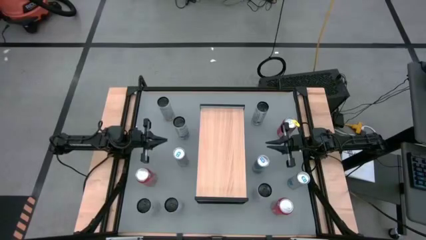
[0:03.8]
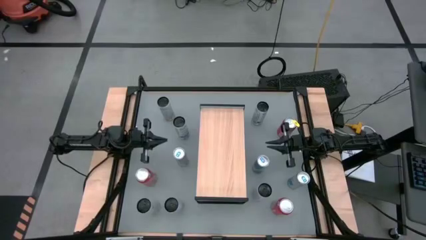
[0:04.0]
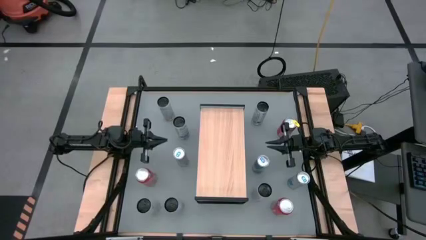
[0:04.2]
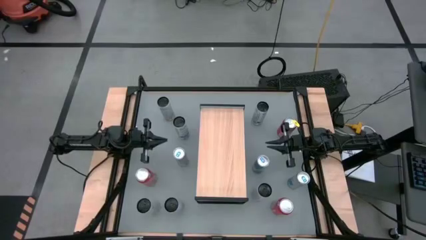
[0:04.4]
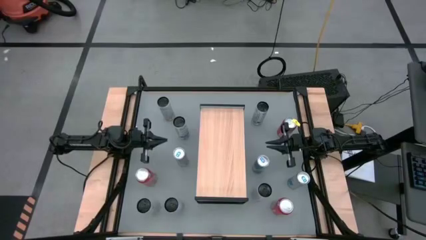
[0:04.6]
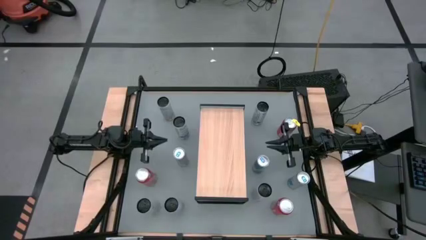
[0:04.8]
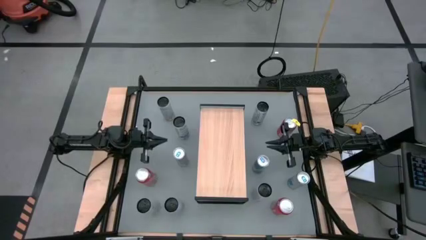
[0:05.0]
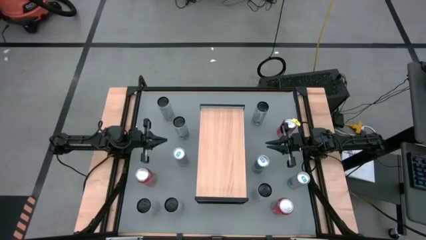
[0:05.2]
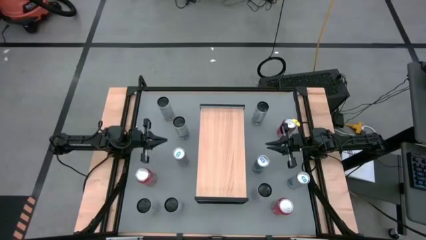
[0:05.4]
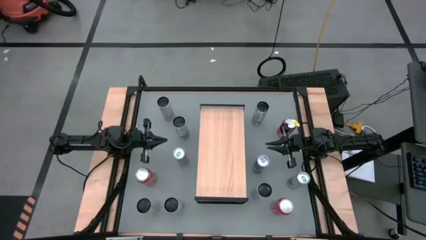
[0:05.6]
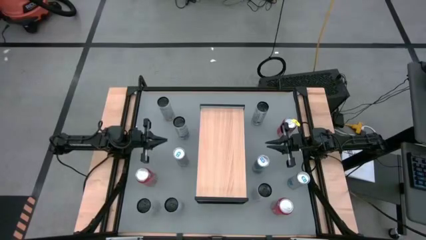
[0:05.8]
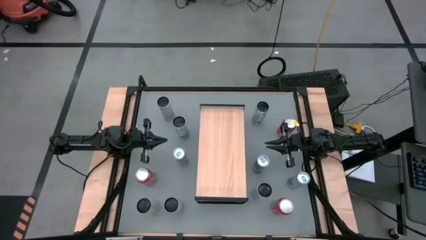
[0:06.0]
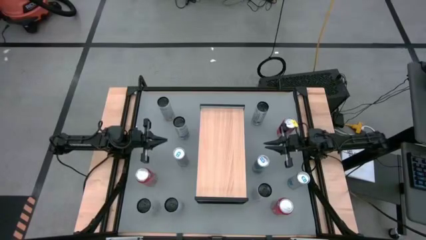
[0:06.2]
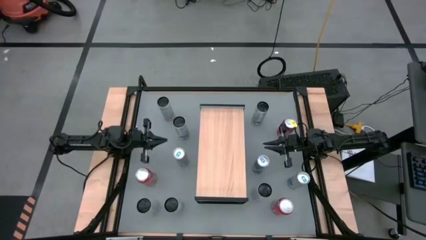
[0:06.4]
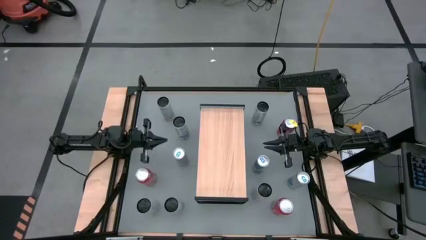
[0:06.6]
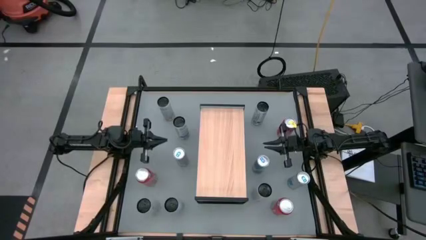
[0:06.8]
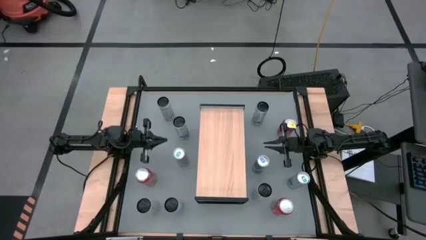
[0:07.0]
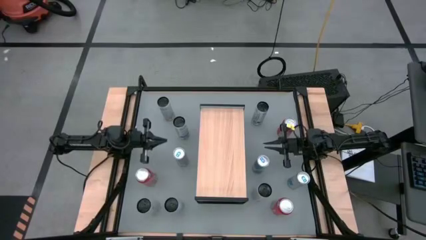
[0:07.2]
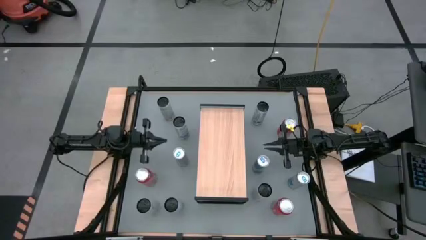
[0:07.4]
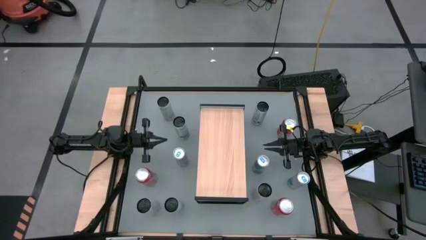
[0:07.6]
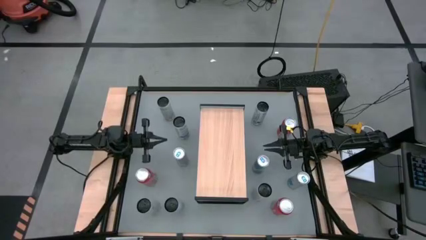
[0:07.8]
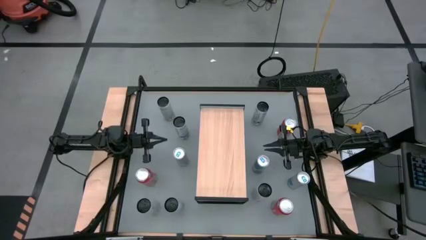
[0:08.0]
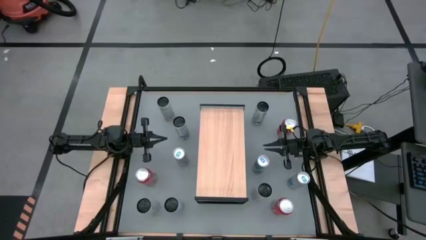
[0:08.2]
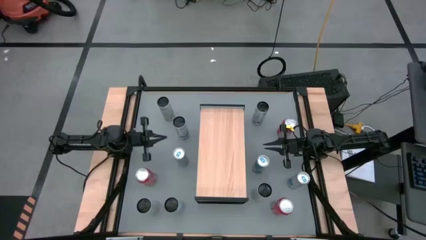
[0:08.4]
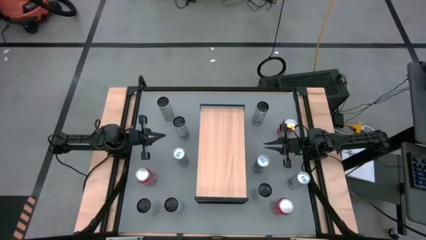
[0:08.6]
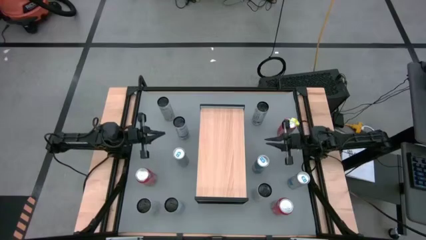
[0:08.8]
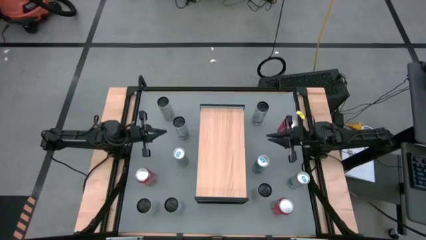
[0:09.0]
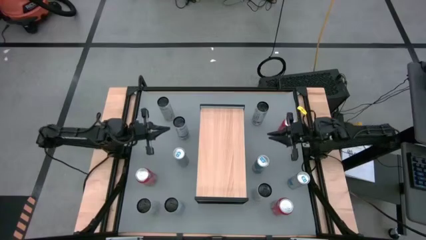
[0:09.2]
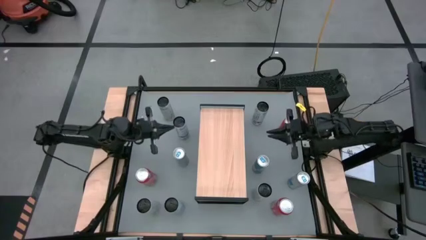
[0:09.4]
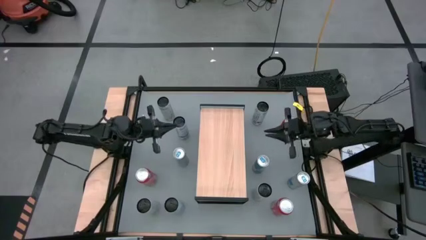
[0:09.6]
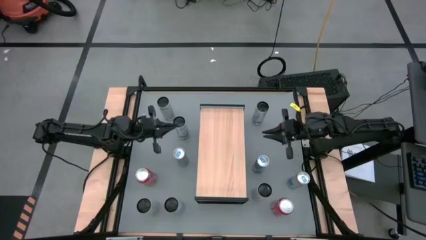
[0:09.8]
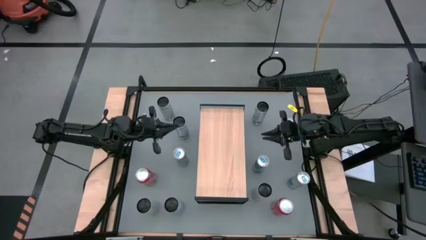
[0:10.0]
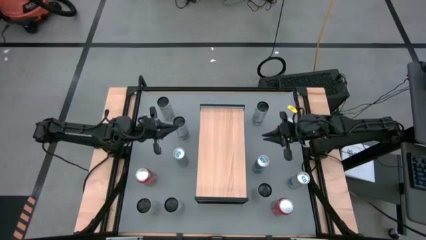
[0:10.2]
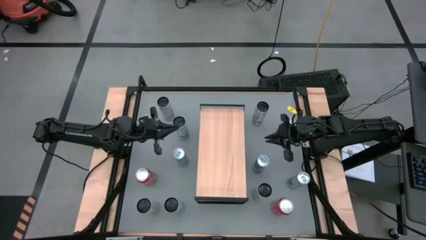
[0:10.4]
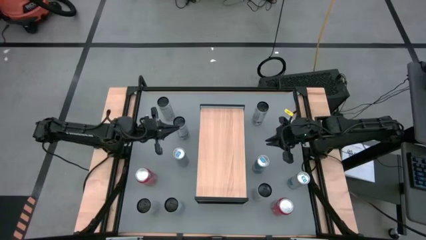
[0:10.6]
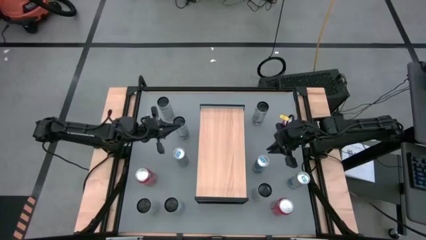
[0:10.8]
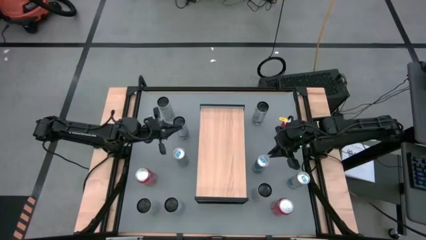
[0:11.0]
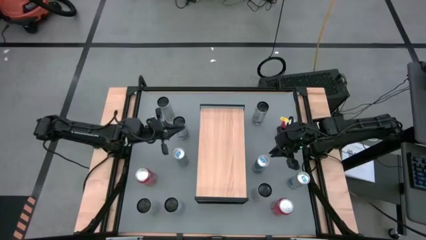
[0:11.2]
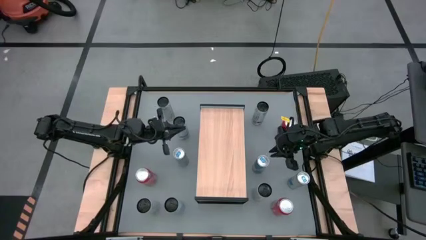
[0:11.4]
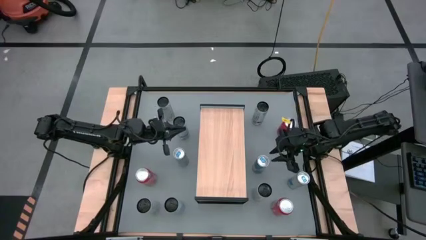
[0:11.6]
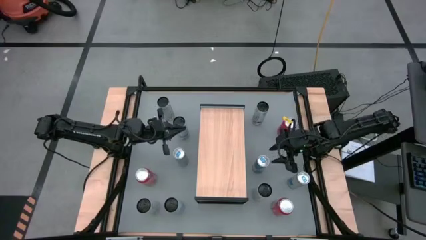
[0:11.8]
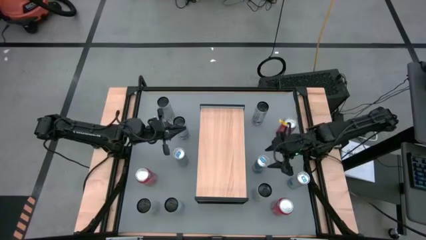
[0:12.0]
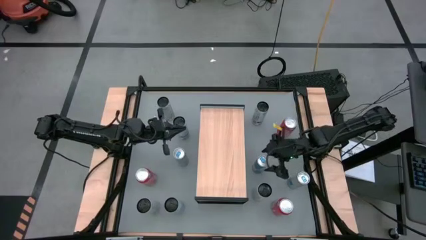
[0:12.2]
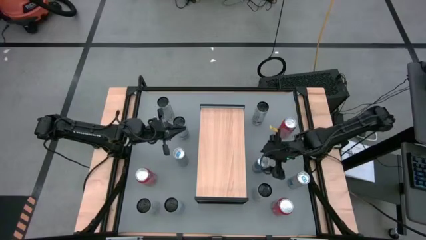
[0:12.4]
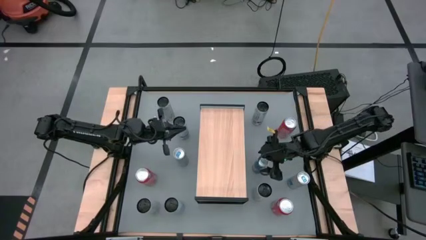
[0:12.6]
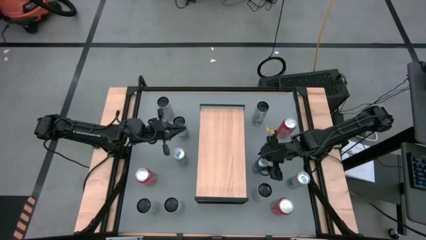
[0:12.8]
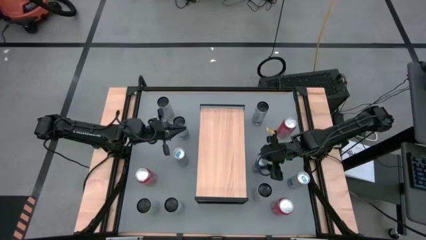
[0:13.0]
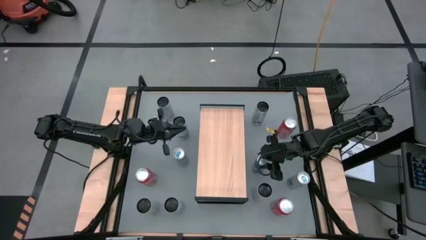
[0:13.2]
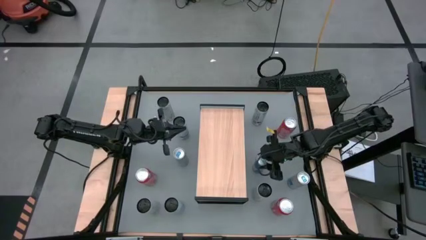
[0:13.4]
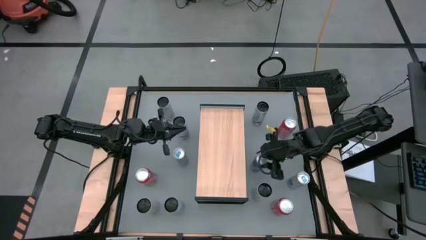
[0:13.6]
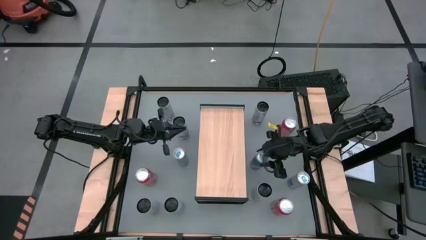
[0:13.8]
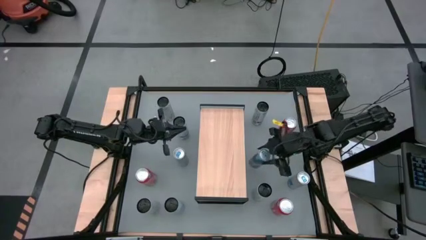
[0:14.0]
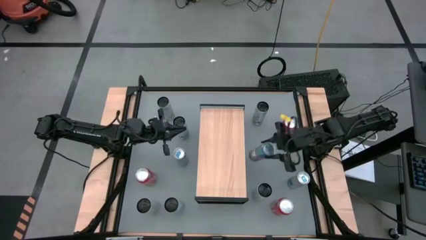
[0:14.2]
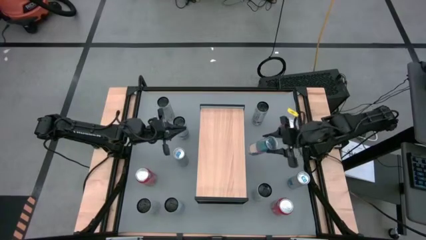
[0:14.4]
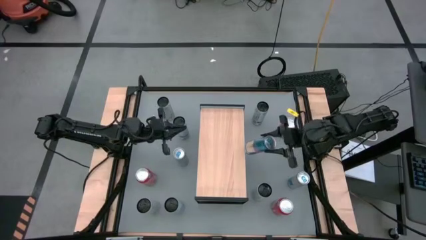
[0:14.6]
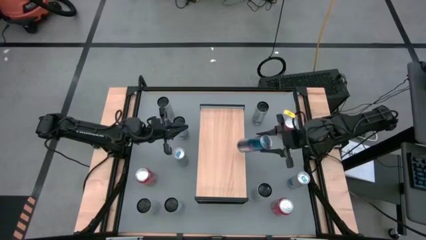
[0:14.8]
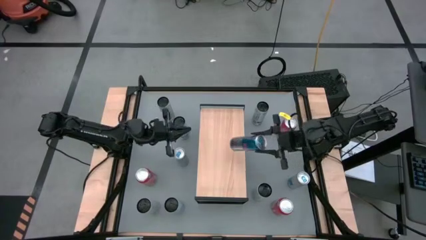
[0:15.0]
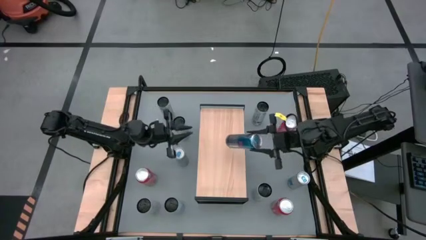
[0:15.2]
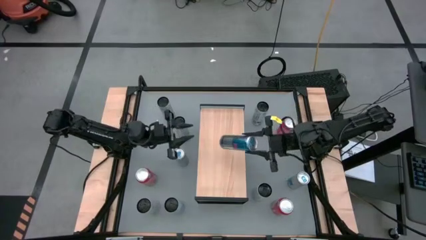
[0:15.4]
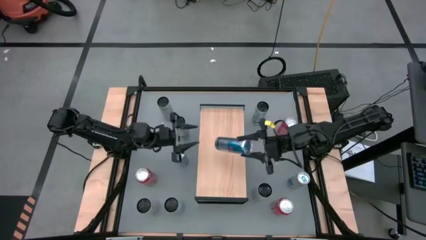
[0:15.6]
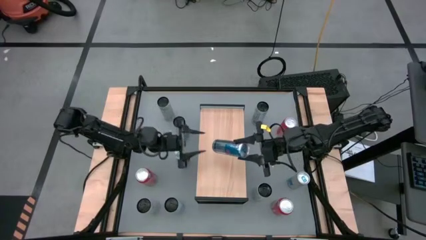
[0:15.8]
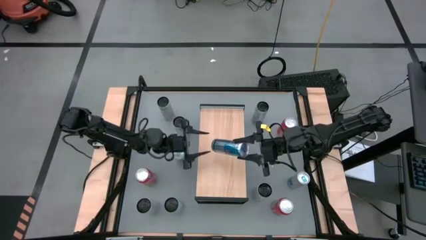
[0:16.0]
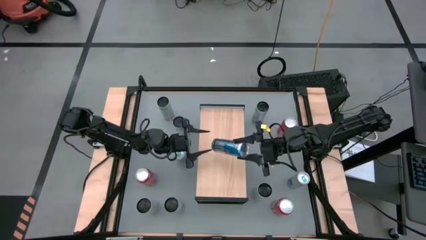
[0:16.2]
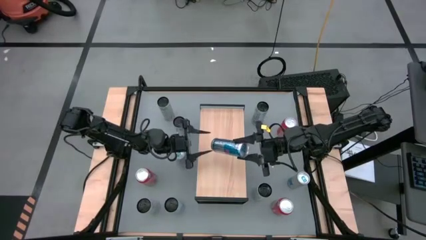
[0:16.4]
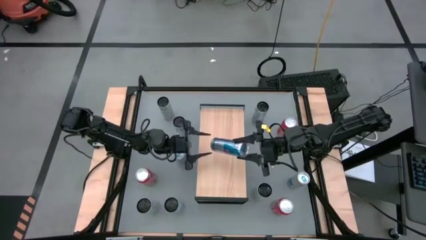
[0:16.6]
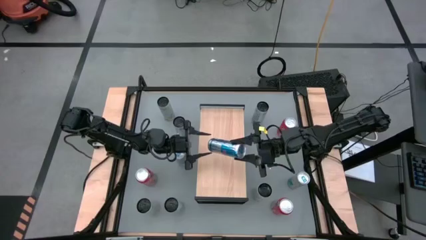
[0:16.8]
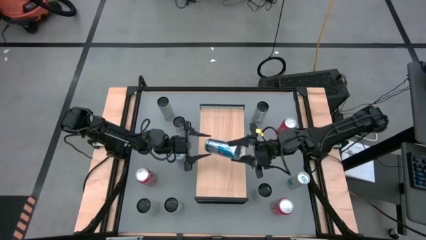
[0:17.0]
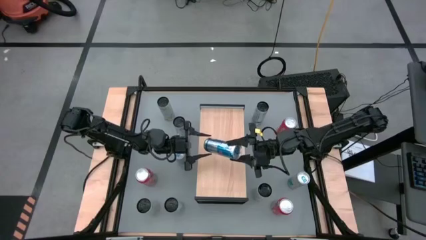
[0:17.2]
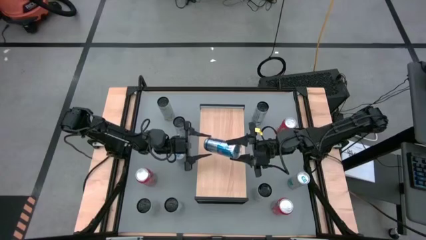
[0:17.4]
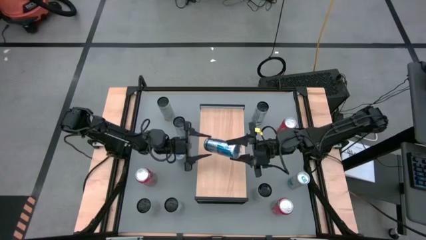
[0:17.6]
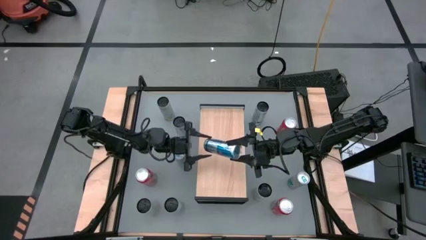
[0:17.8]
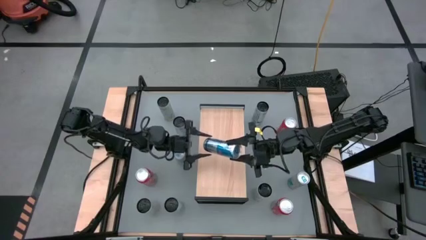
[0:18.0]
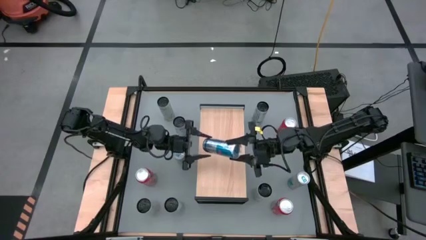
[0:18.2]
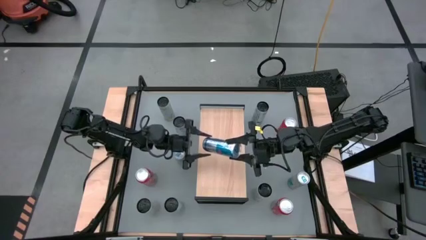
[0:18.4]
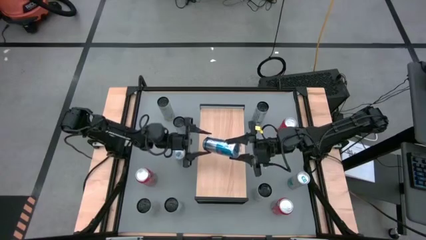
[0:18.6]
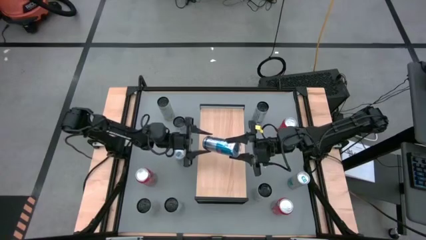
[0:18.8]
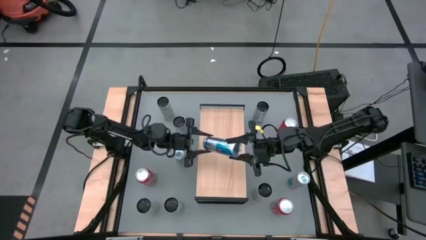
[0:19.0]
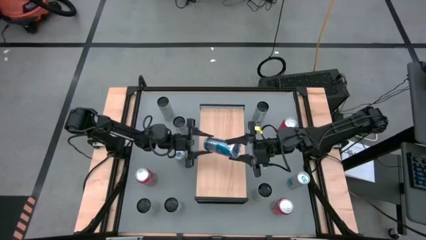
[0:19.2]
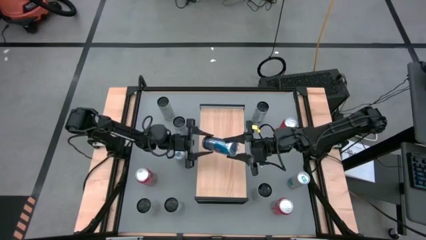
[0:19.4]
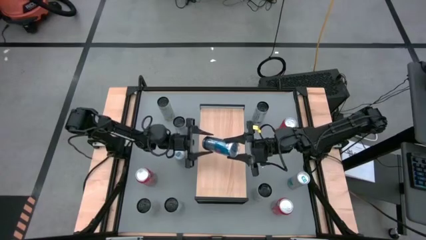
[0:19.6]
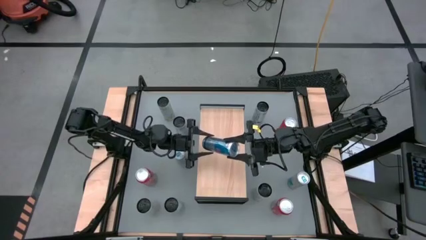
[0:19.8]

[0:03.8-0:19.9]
Task: Place canned beverage on shelf
Put the middle right blue soda can on the shelf
